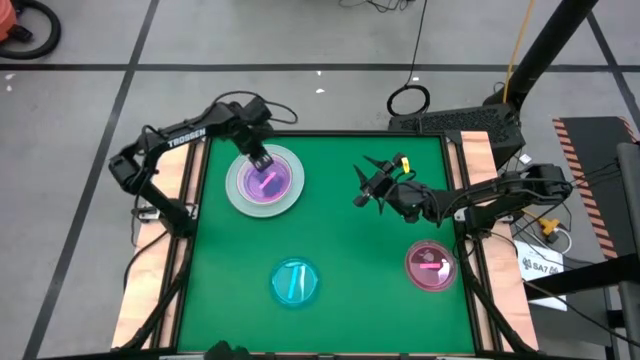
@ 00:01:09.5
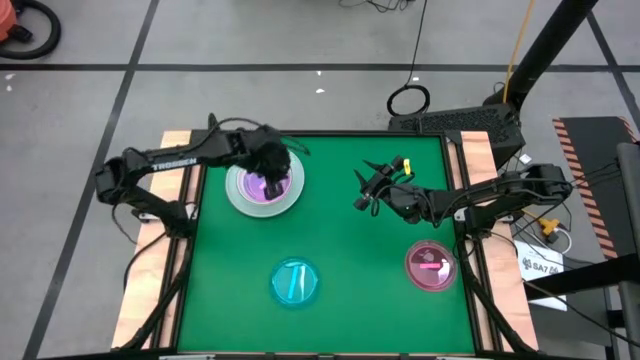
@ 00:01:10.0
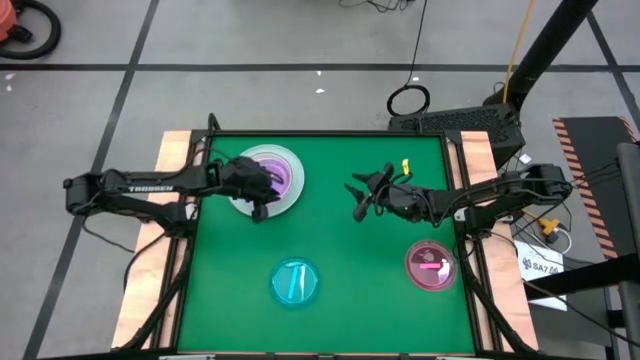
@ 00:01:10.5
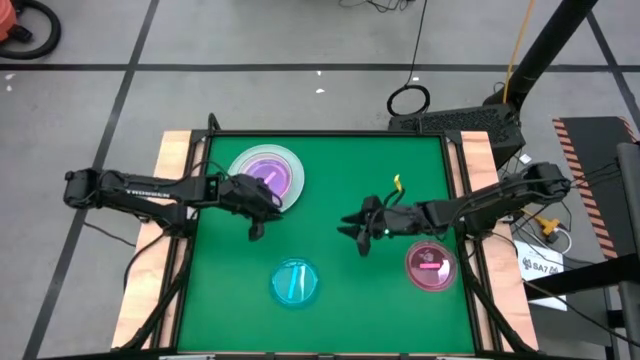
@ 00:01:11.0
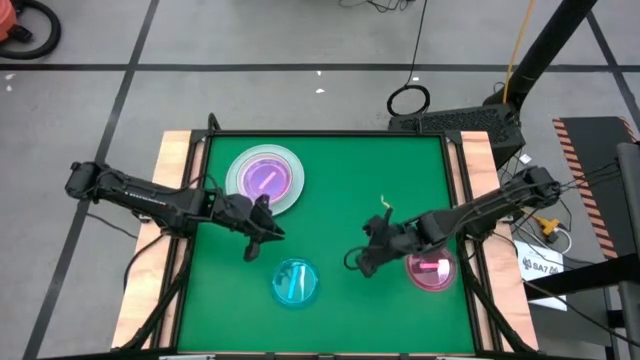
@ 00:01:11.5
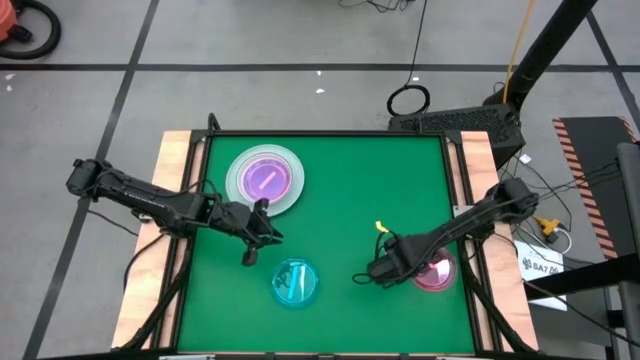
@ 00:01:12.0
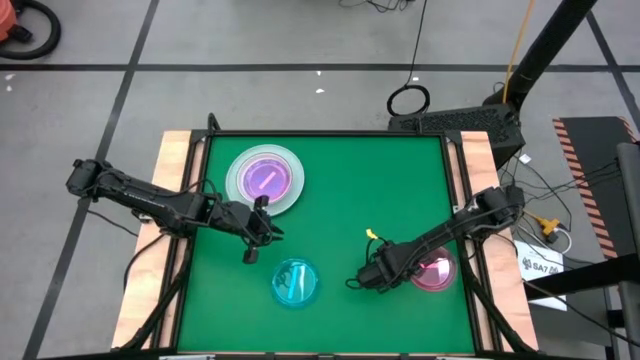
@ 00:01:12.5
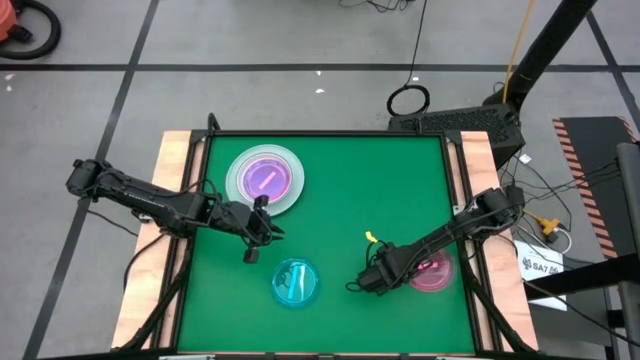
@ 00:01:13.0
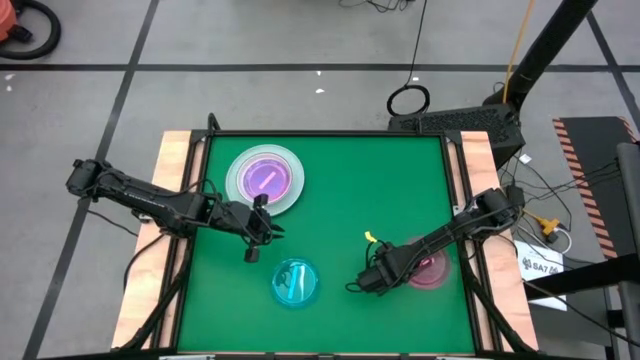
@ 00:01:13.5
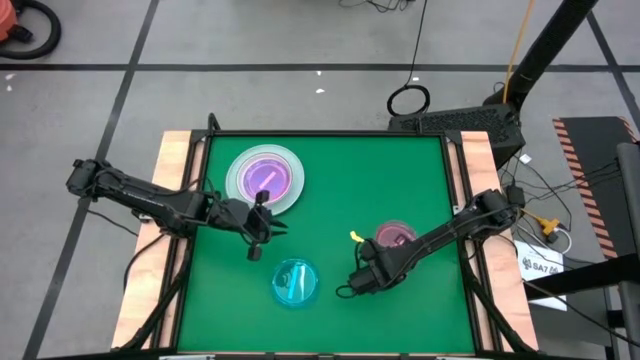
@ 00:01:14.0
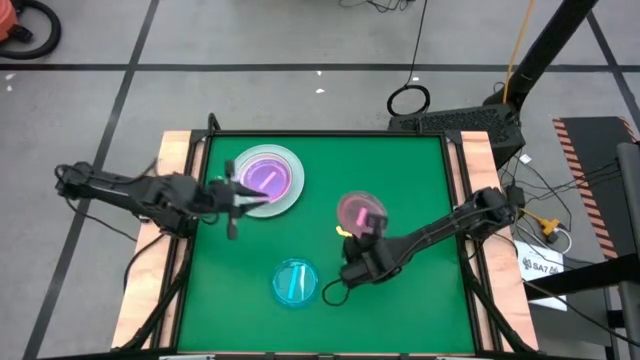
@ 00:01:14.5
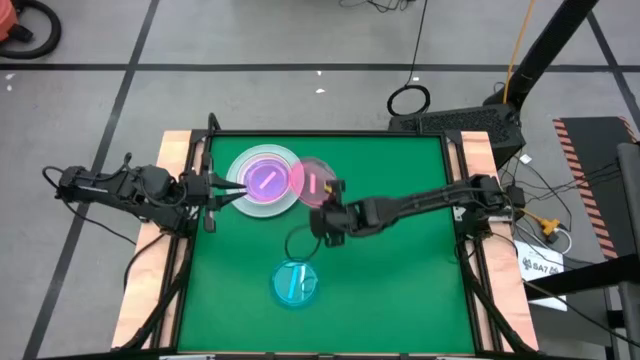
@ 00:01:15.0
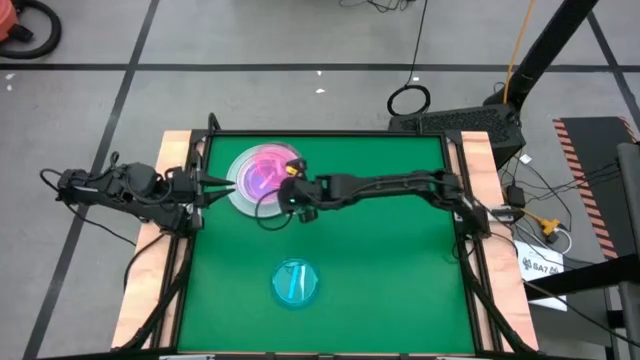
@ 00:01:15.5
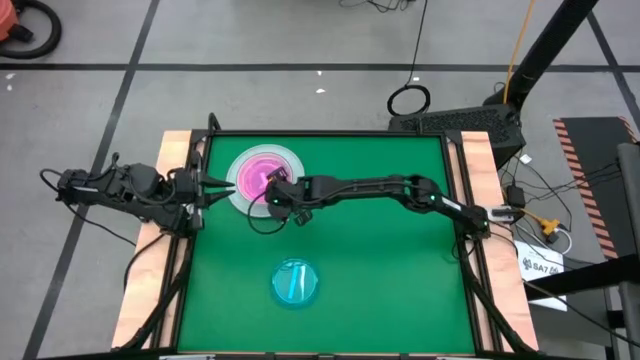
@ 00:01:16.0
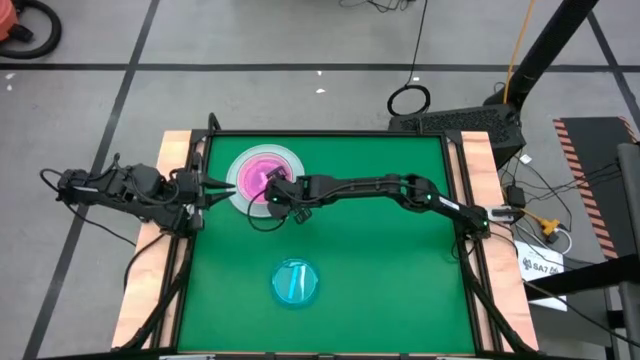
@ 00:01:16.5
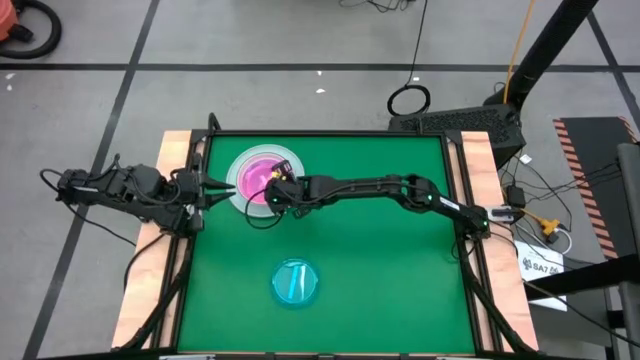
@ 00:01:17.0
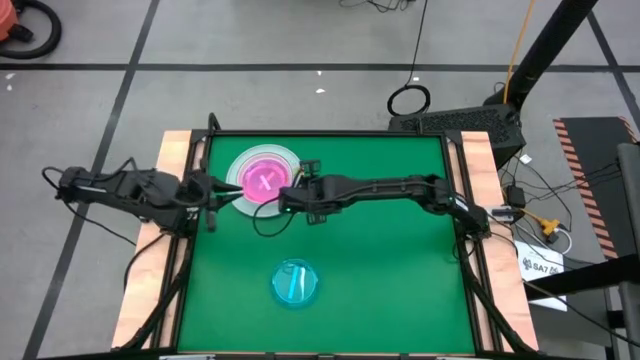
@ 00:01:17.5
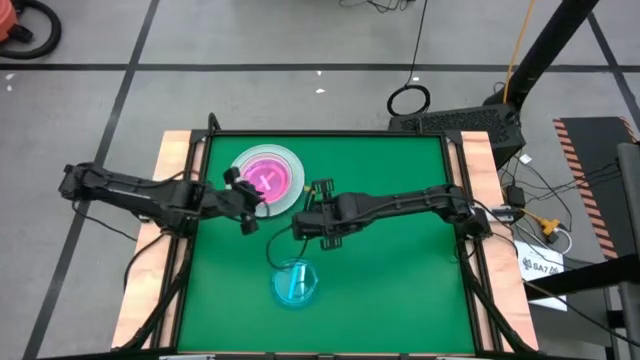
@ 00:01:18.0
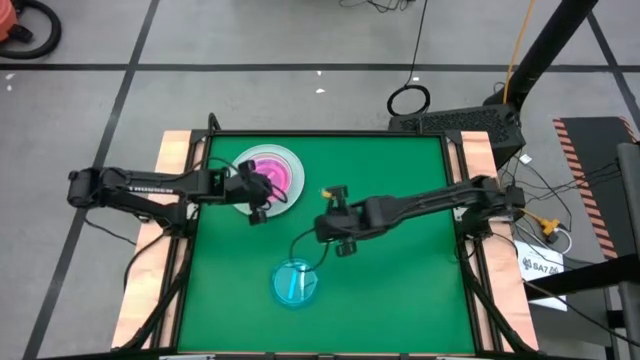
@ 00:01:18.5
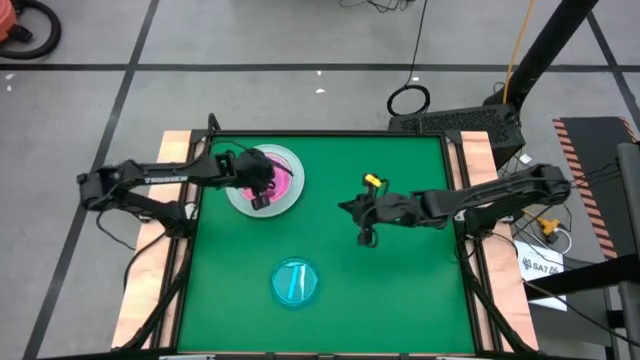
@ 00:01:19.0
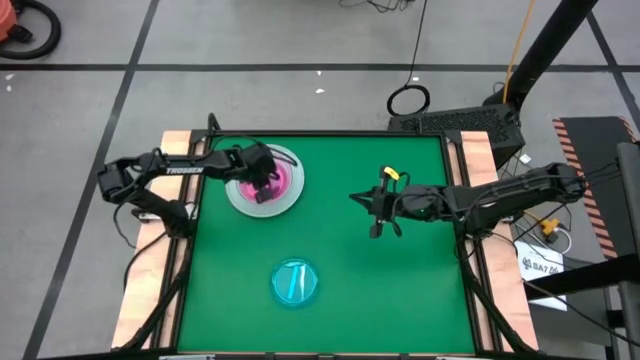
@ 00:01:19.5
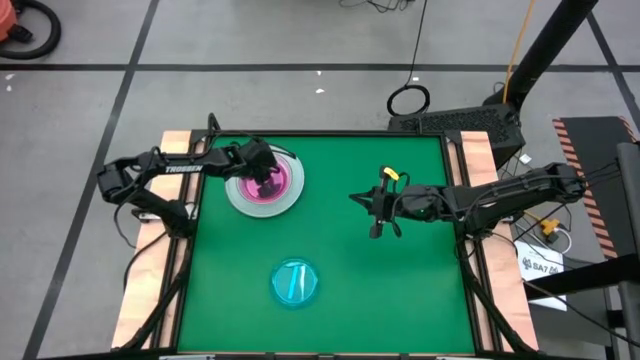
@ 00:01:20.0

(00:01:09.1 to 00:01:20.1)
Task: Stack plastic plates
Stack the pink plate on top of the pink plate

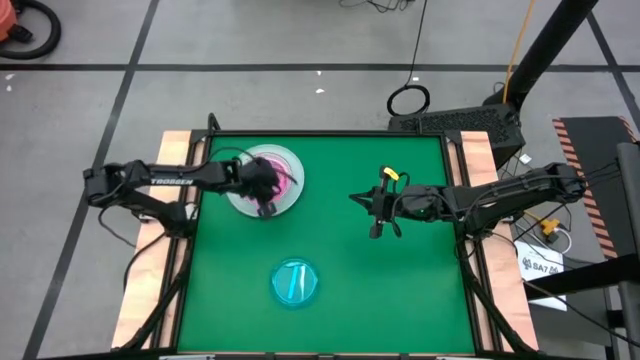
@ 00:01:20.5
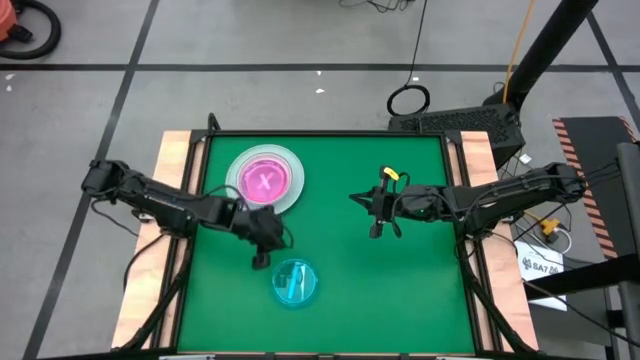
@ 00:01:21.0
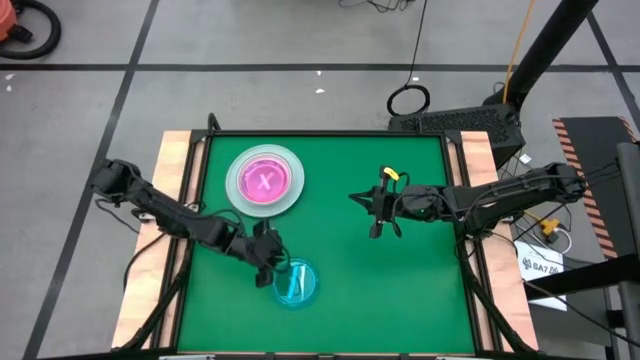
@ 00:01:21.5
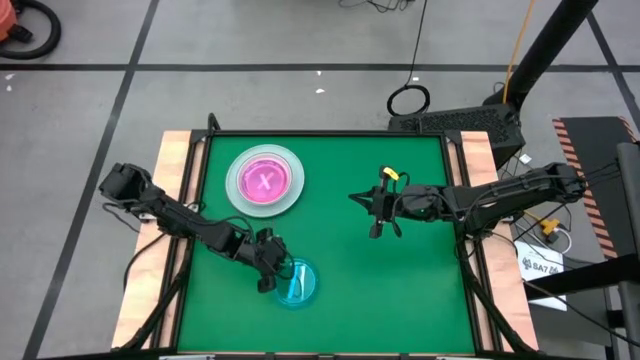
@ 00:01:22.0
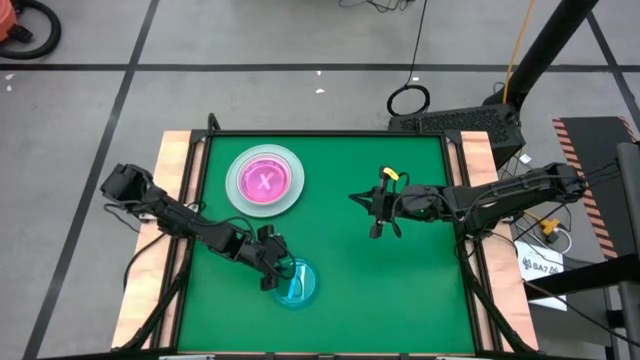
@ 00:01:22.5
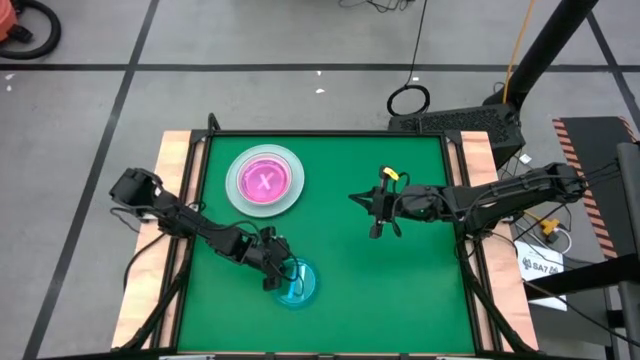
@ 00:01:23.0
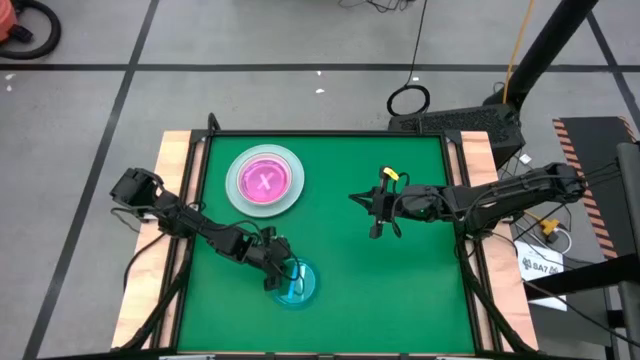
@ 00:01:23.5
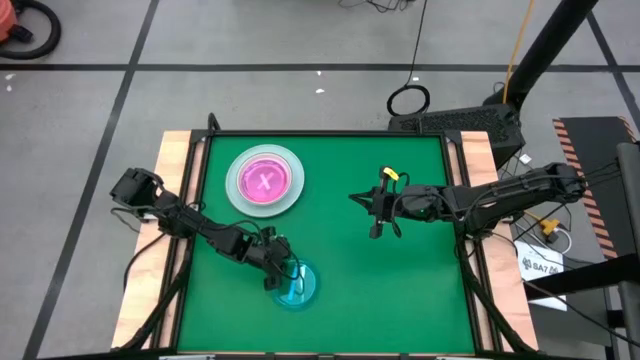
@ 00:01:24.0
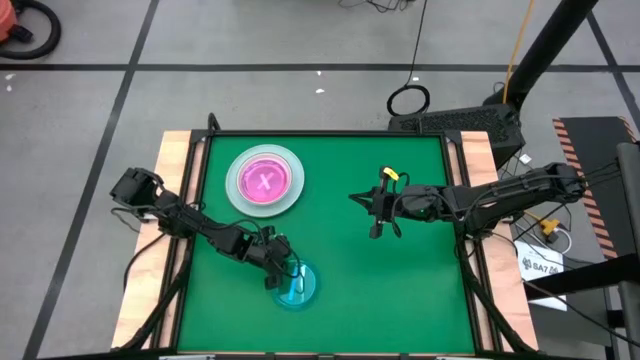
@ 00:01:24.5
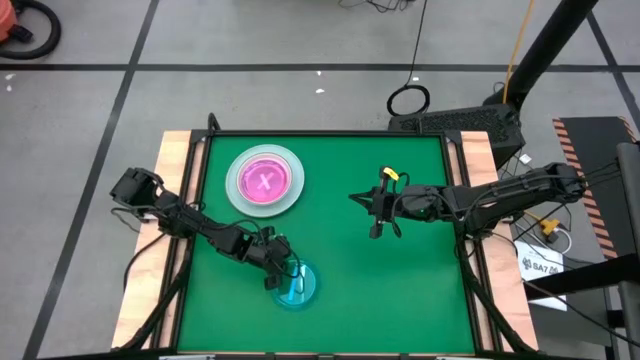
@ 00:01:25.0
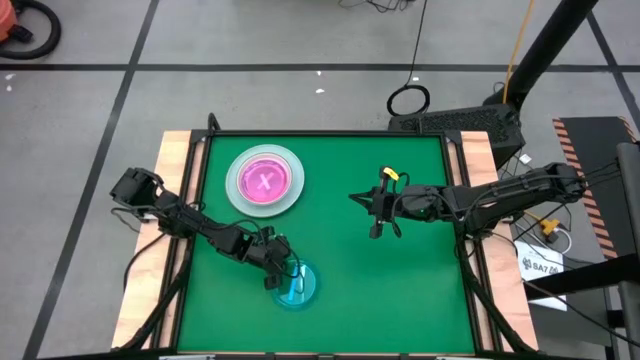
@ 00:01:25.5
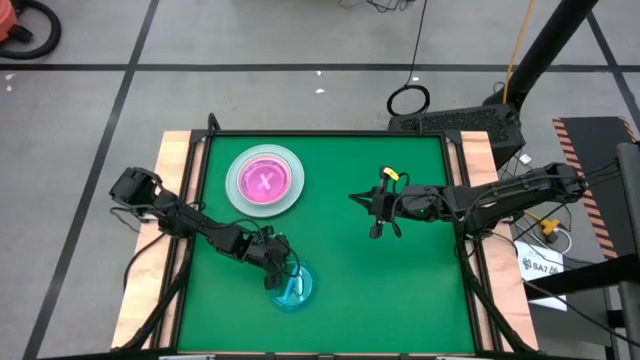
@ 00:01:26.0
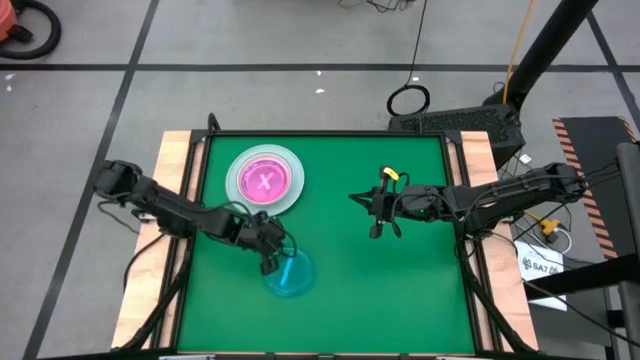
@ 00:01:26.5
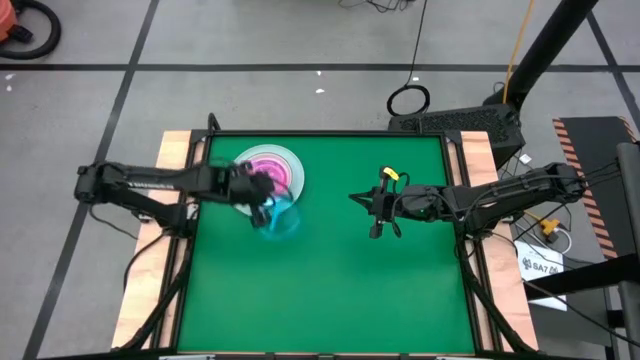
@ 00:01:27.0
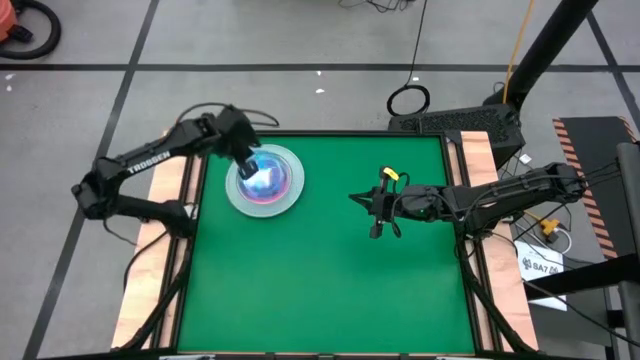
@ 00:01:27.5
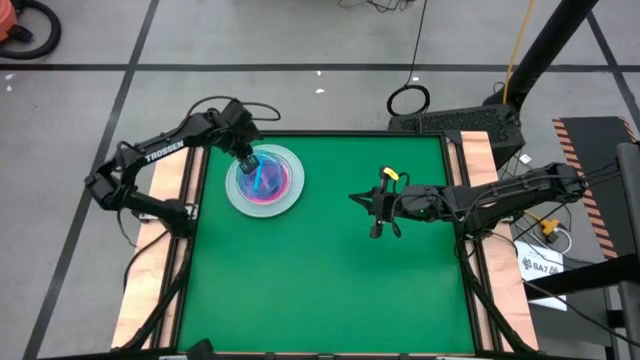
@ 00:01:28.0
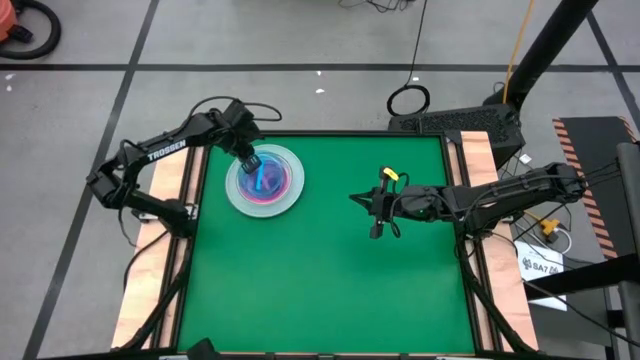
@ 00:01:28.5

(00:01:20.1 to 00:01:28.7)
Stack the blue plate on top of the pink plate

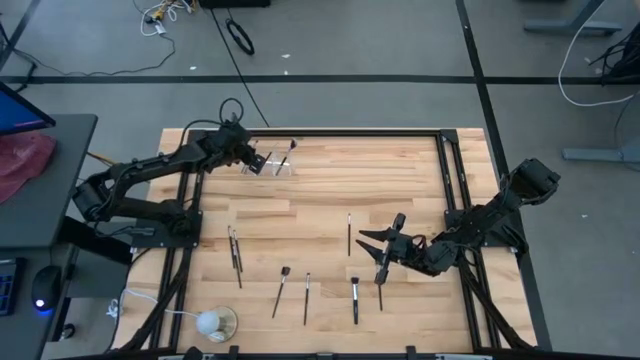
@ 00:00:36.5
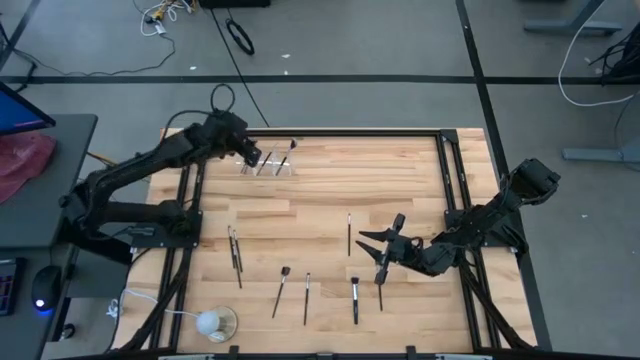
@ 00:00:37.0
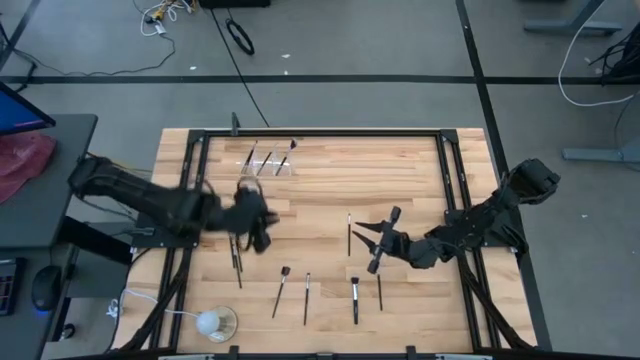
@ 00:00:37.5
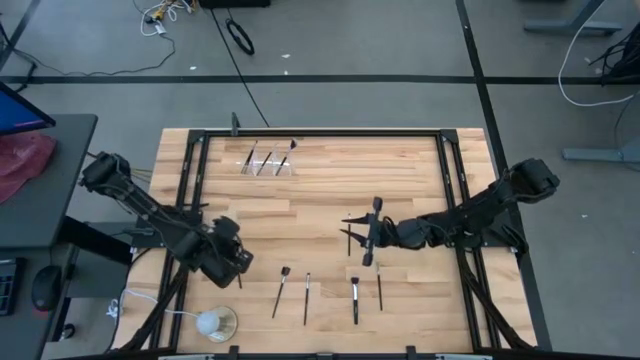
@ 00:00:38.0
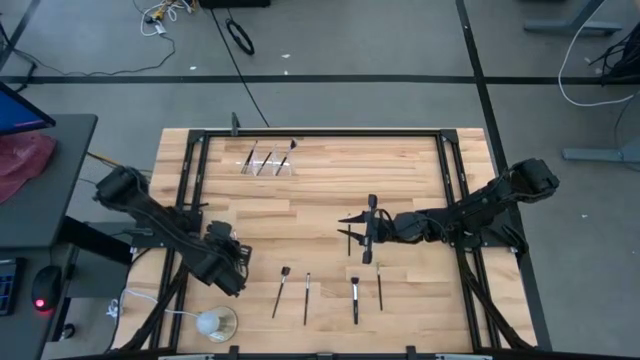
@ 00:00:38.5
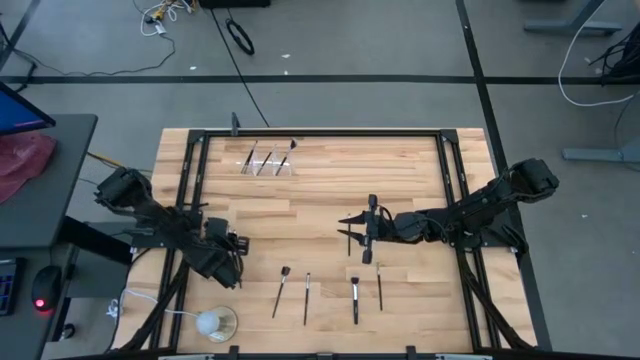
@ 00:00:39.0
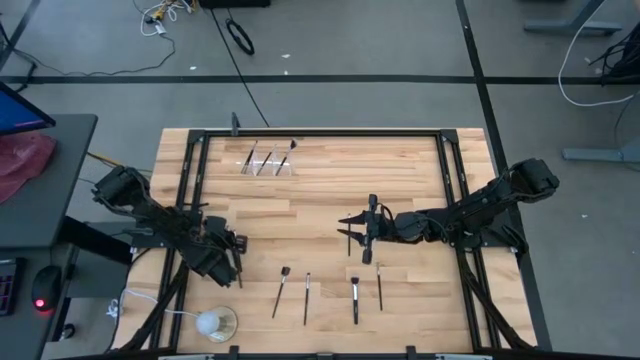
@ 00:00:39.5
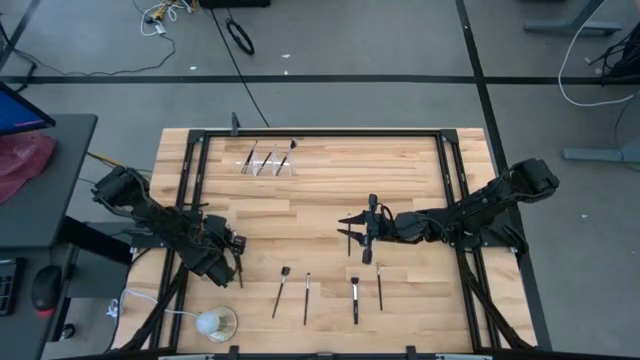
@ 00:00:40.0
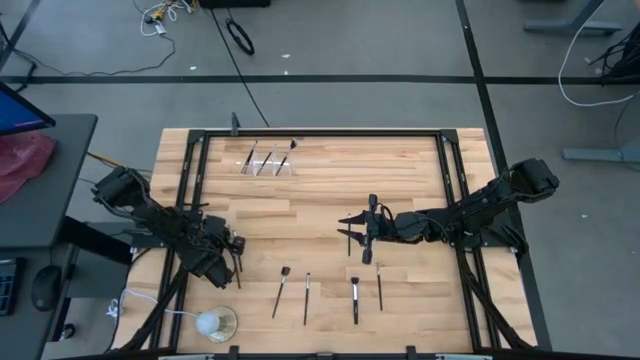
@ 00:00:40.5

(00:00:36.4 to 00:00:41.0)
Task: Put items in baskets/containers
Put the eyeshadow brush into the right section of the transparent organizer
